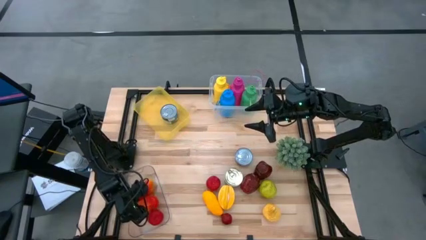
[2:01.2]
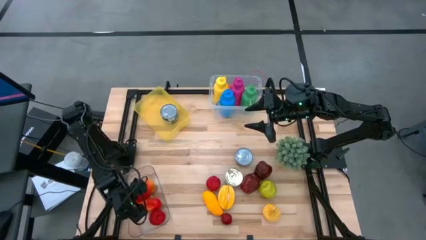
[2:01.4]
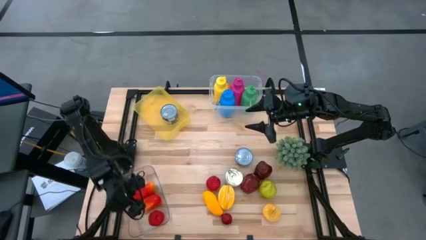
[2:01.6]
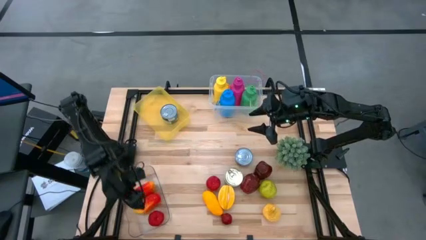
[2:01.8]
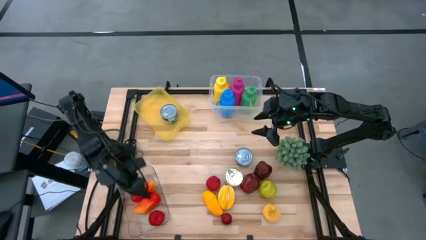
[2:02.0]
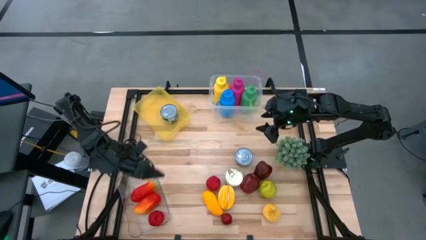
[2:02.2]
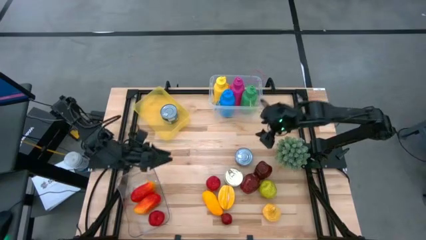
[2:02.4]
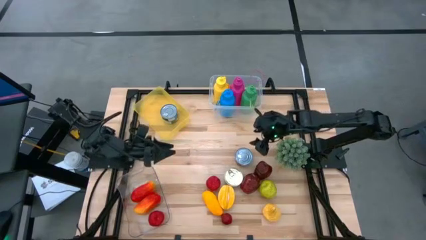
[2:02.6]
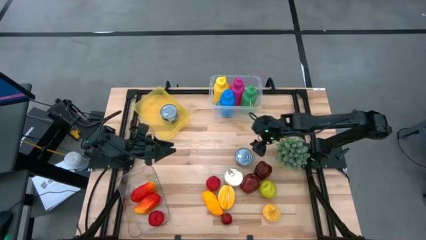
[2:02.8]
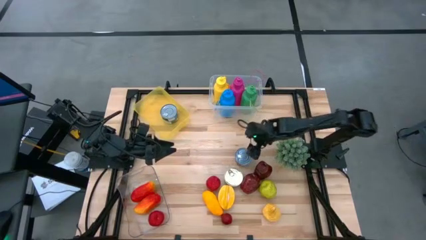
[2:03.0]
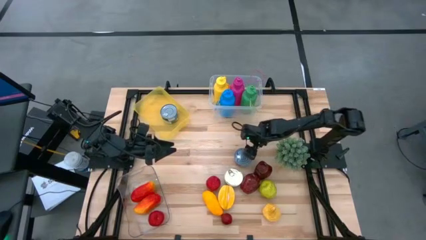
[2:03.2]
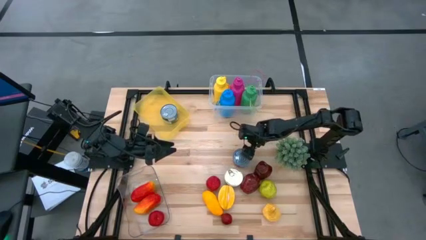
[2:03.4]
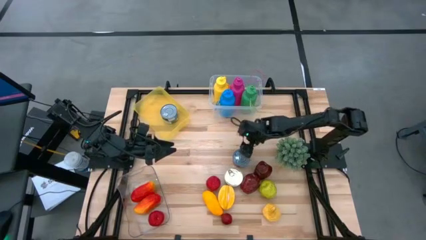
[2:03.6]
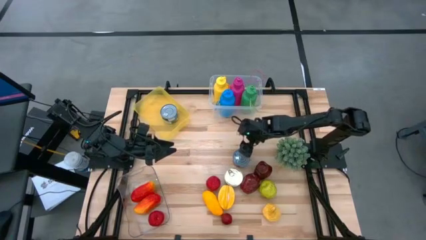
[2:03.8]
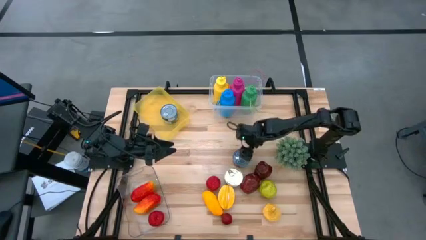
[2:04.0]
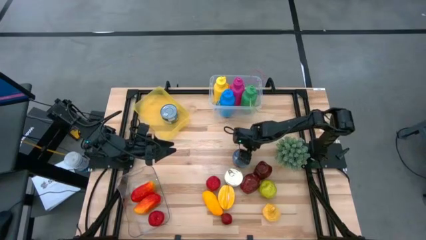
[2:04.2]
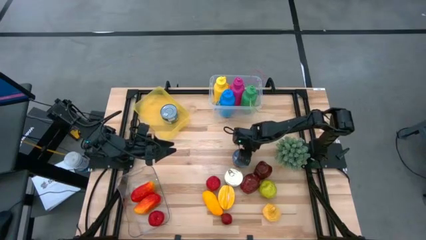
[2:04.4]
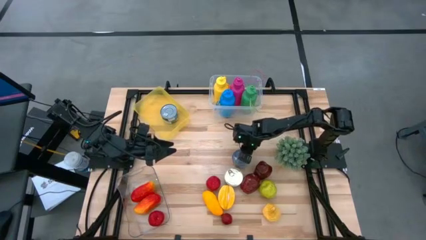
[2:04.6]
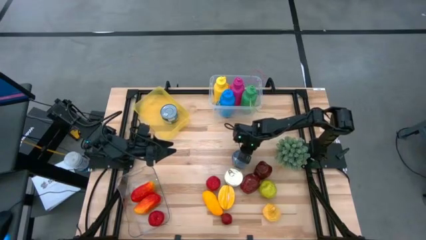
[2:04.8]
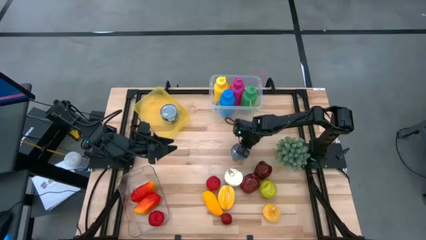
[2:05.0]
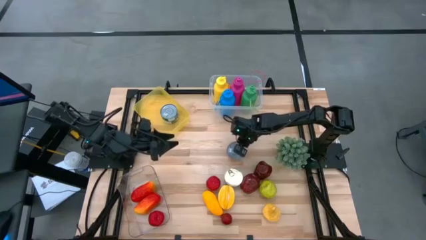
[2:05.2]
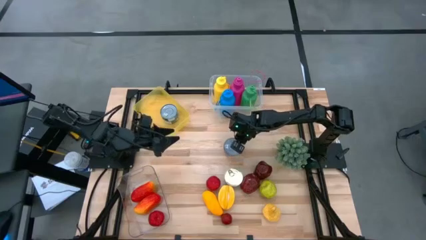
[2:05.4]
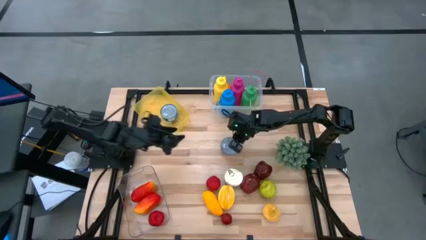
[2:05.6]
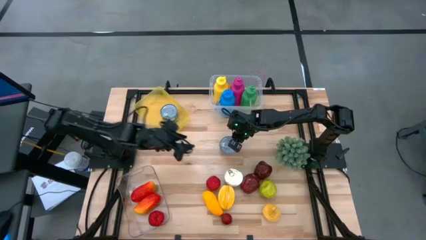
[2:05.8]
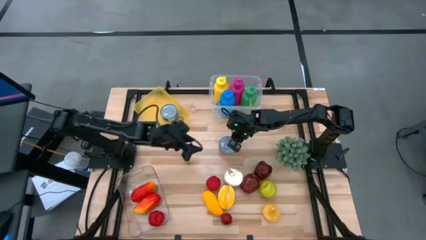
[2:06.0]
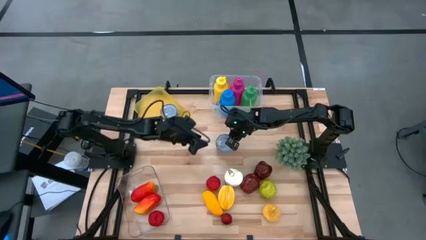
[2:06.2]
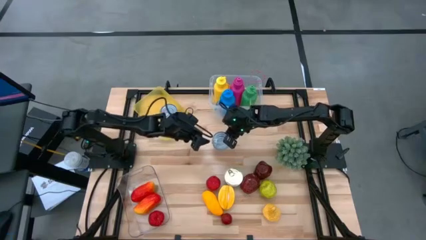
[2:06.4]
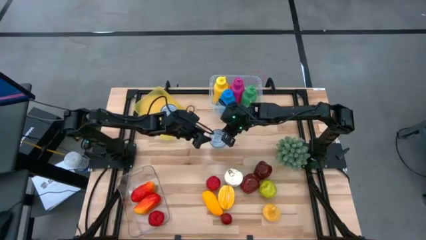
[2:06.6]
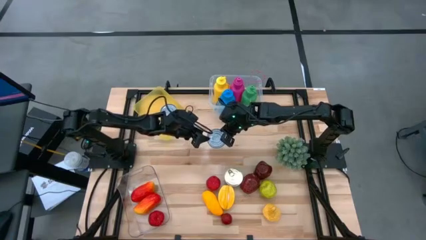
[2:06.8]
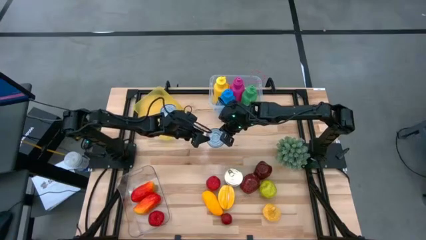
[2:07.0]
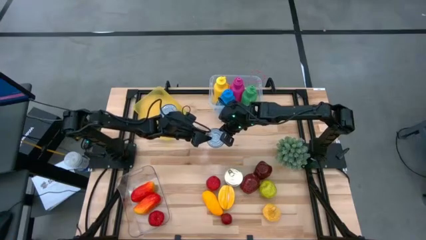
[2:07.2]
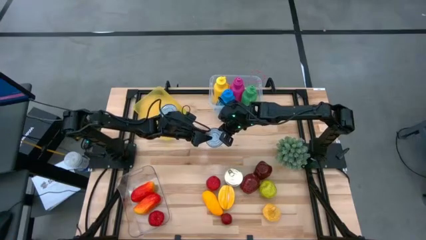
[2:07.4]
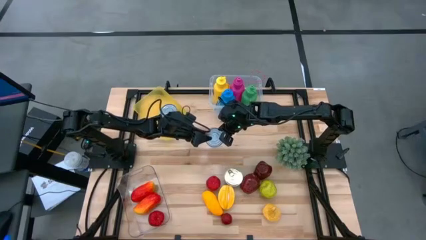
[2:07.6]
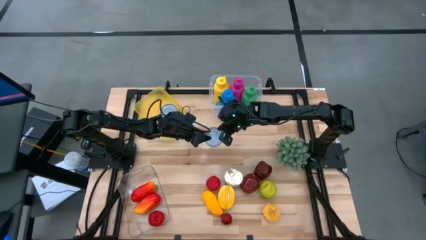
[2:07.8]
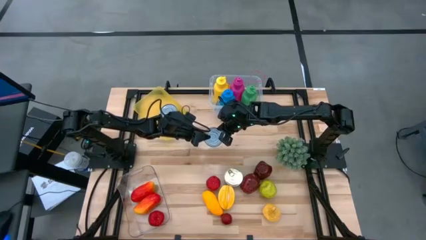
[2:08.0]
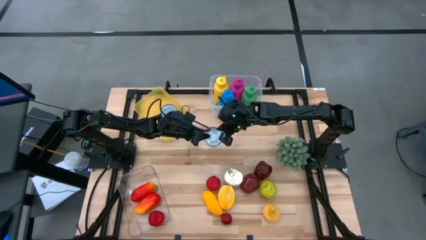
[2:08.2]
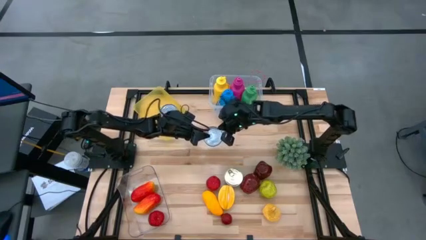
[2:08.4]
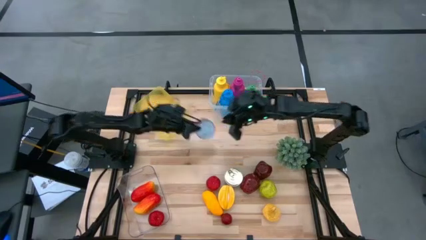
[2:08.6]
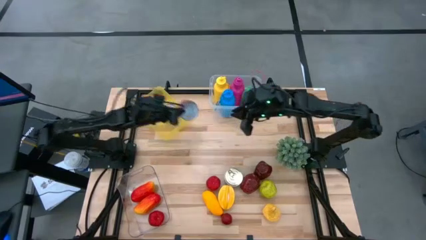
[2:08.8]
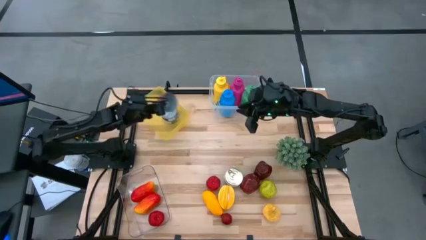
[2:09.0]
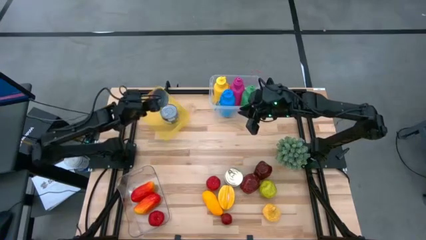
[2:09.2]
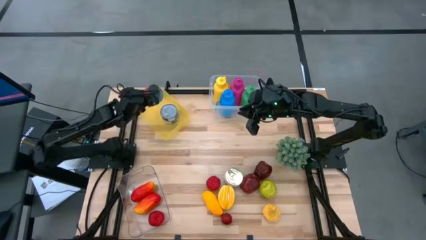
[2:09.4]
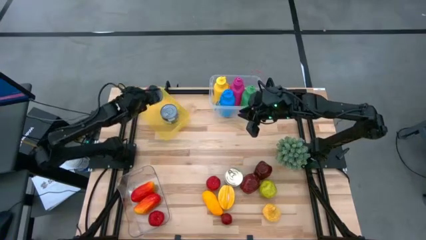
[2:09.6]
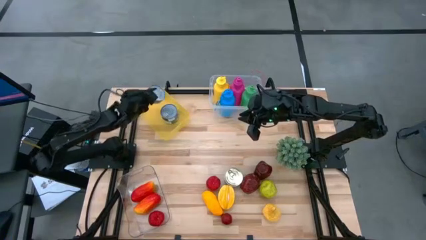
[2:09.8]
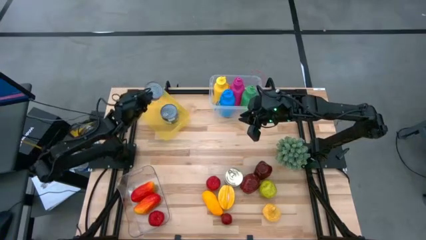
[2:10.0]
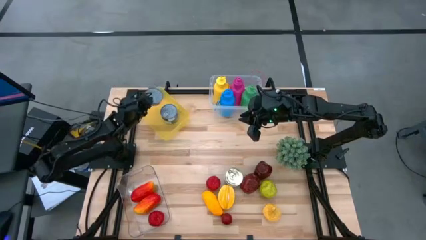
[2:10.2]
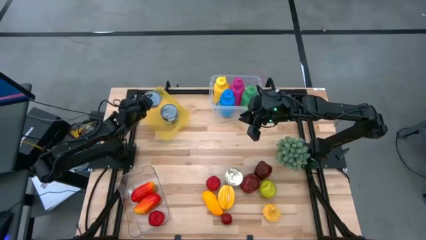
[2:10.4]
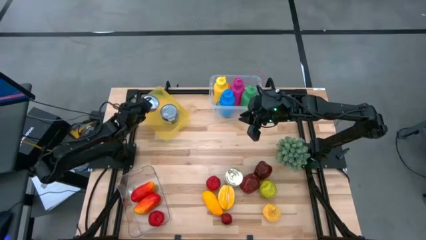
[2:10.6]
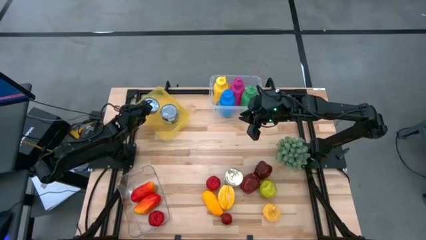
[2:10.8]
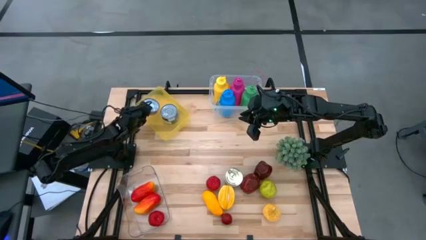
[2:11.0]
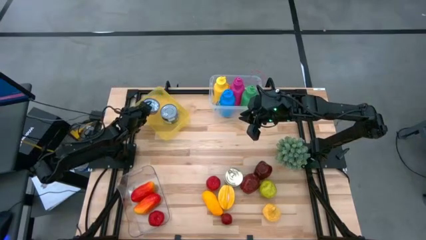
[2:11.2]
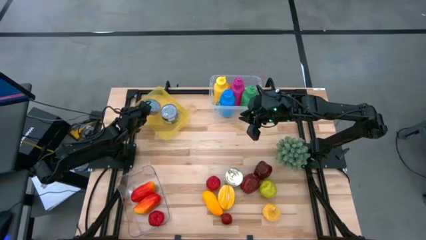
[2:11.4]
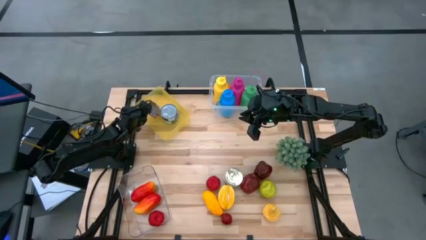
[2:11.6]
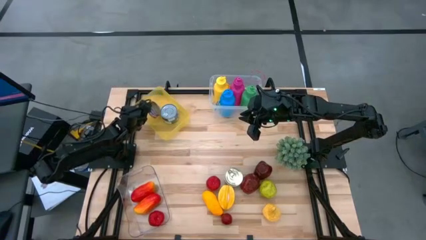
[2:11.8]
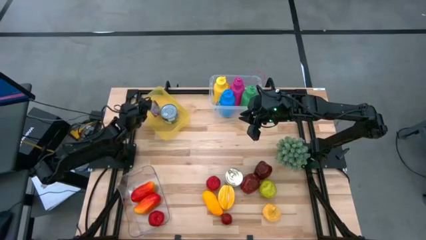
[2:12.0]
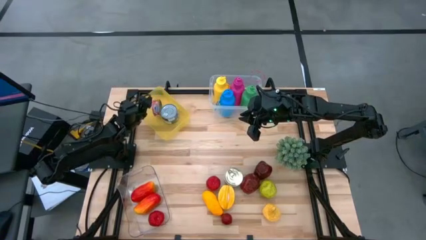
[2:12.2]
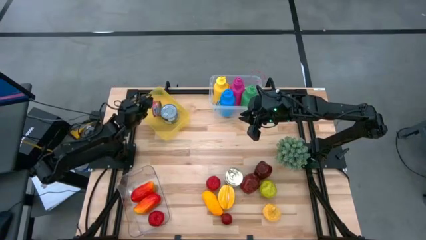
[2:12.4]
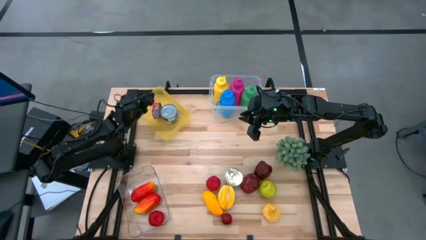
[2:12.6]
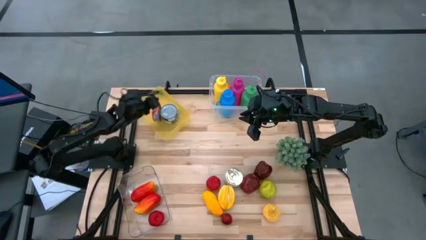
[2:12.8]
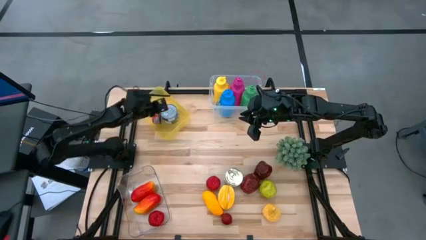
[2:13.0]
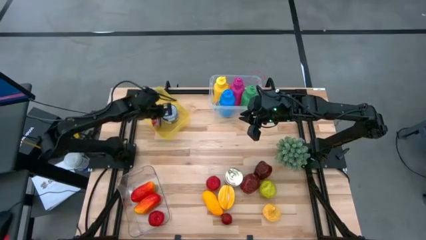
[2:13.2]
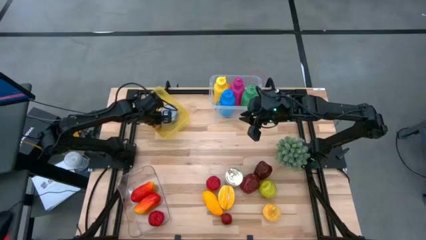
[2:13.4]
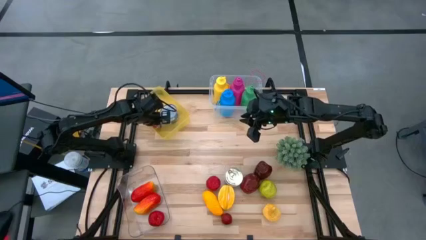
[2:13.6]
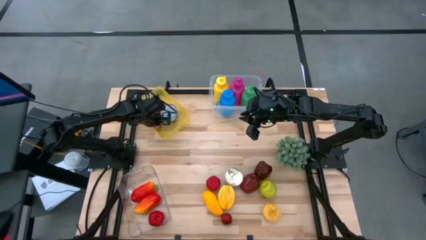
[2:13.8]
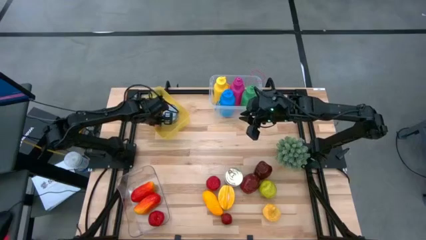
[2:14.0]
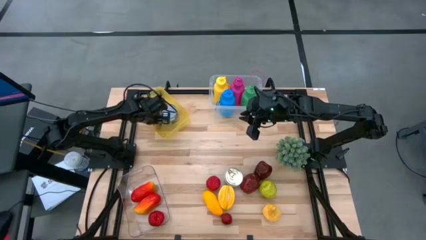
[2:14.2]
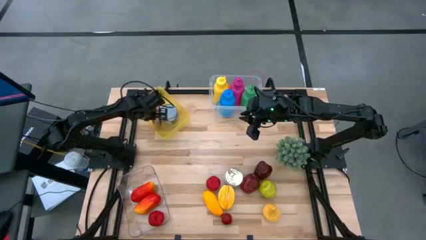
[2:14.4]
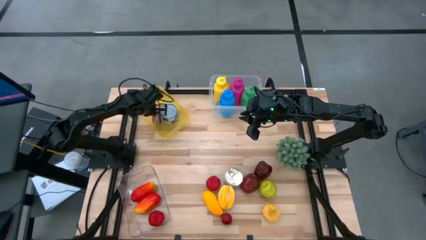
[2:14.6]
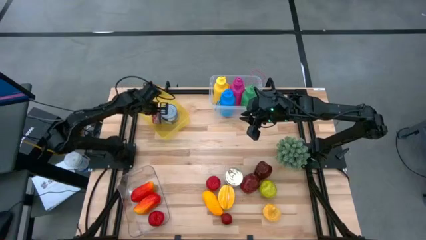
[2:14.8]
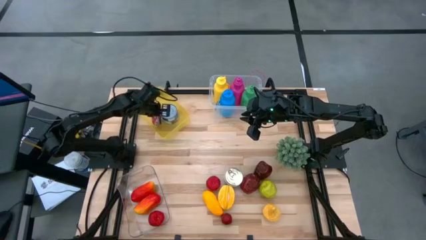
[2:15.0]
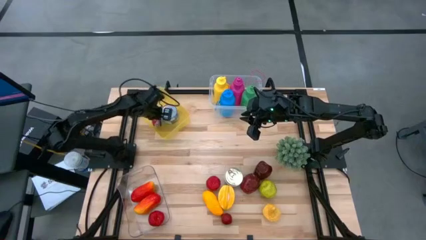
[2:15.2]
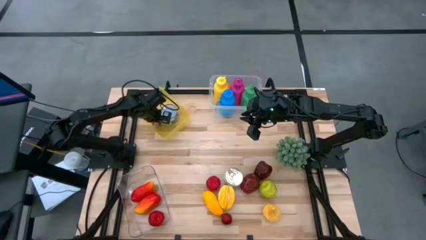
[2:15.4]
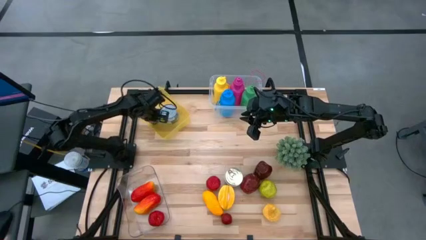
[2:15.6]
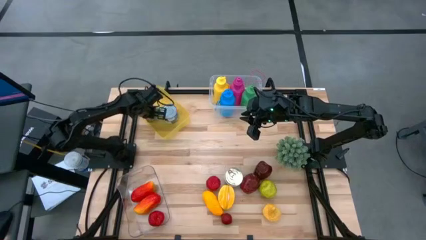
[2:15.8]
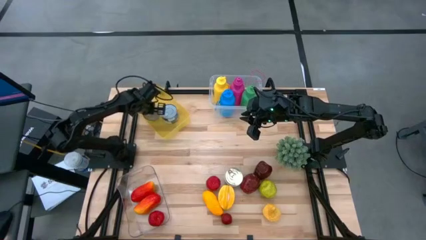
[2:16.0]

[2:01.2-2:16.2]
Task: Pick & Place Food Item
Put the red tuna can into the yellow bin

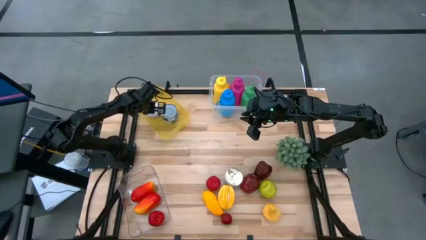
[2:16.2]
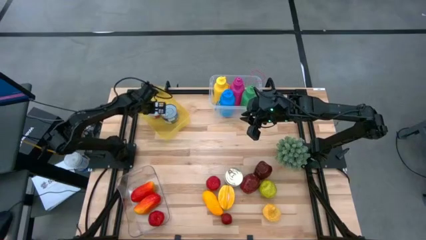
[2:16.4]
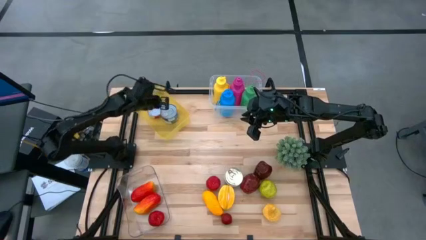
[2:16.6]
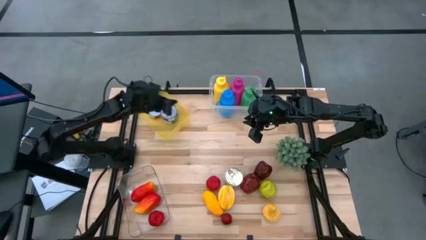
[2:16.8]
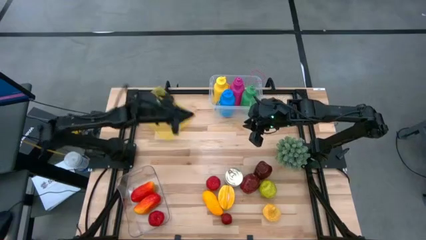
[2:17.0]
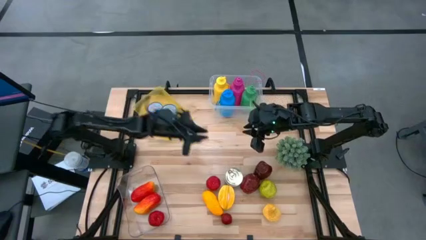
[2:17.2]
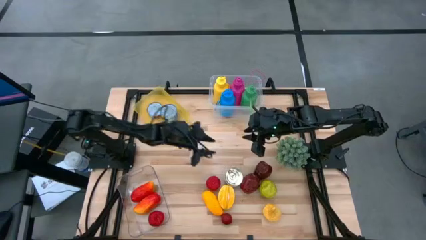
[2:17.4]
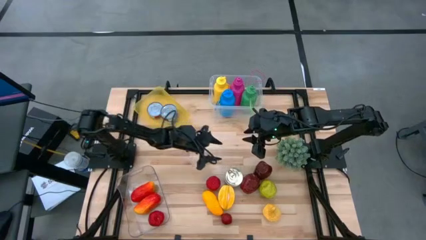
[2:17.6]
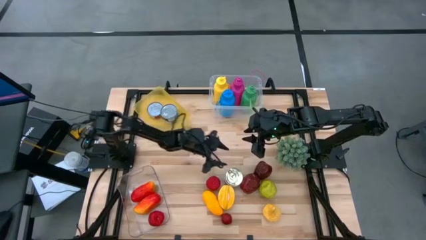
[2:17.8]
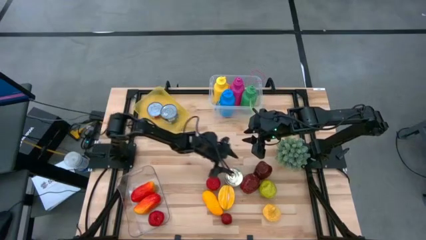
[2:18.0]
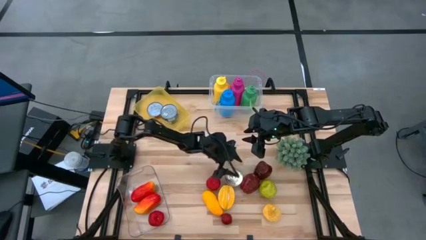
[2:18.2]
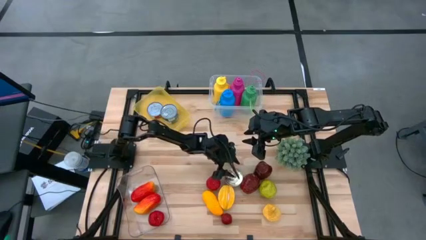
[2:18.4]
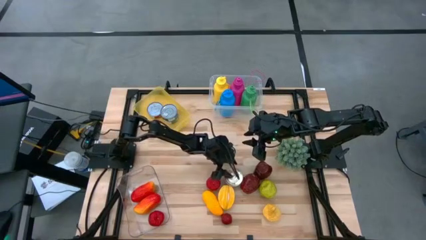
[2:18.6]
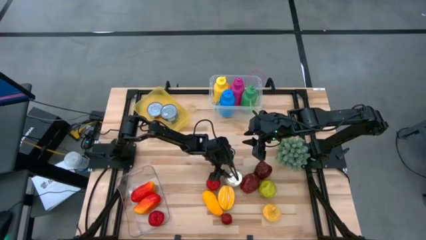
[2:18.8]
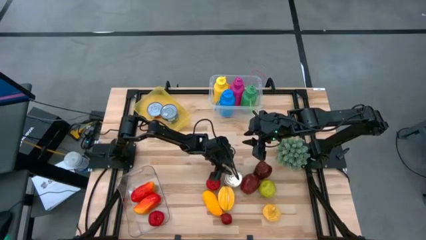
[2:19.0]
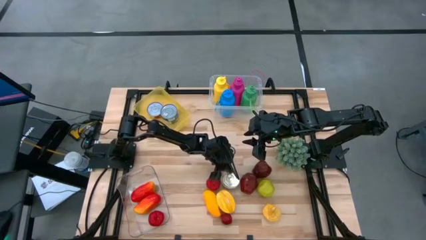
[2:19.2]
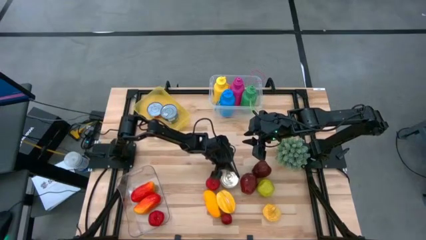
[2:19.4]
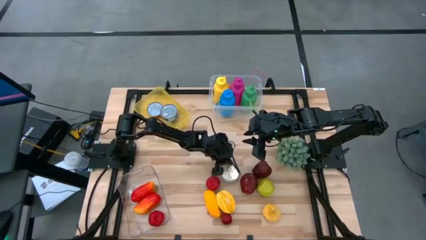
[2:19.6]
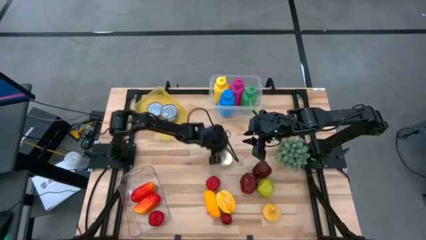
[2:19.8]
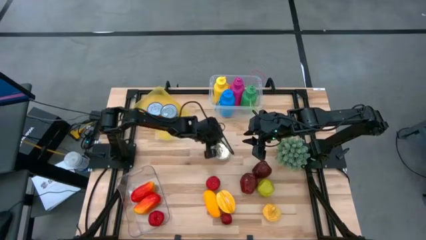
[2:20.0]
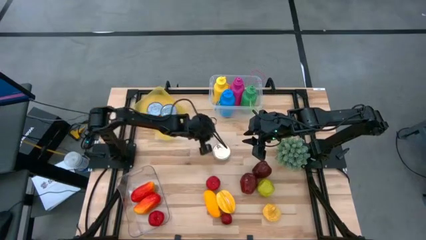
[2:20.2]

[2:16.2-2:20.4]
Put the blue tuna can into the yellow bin
